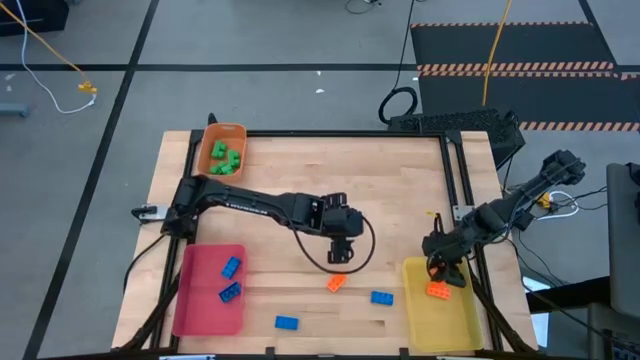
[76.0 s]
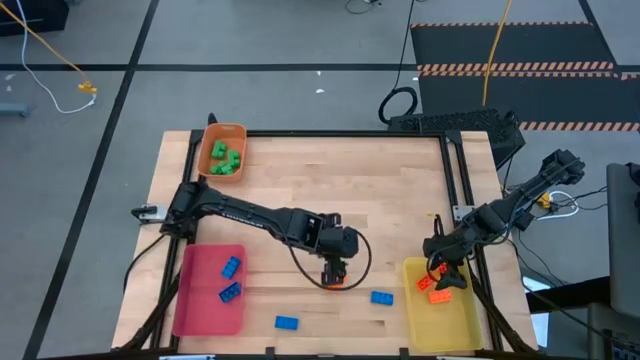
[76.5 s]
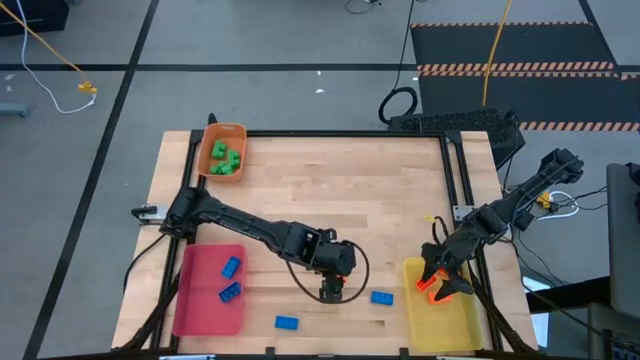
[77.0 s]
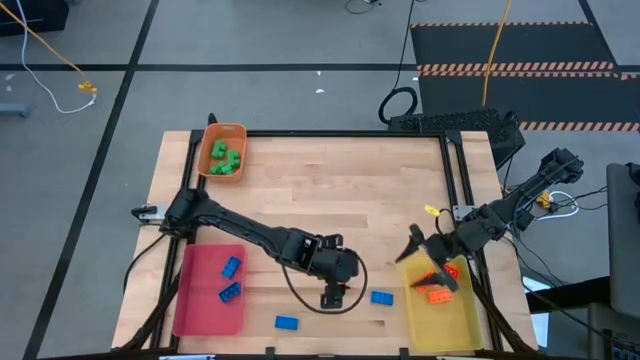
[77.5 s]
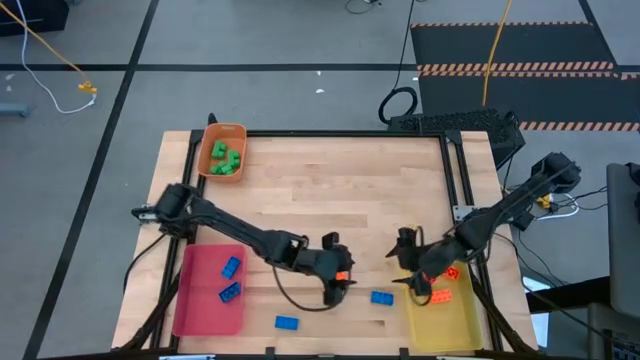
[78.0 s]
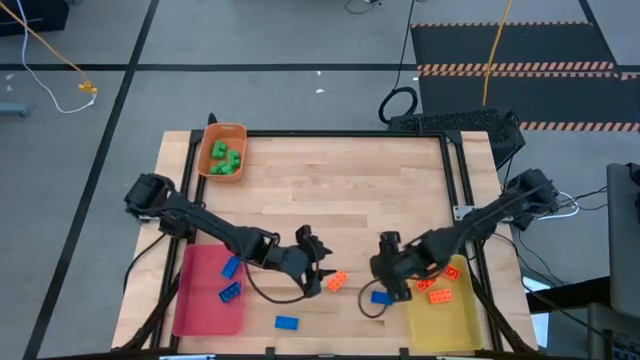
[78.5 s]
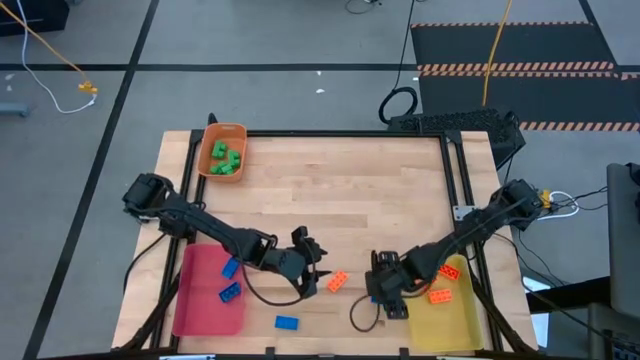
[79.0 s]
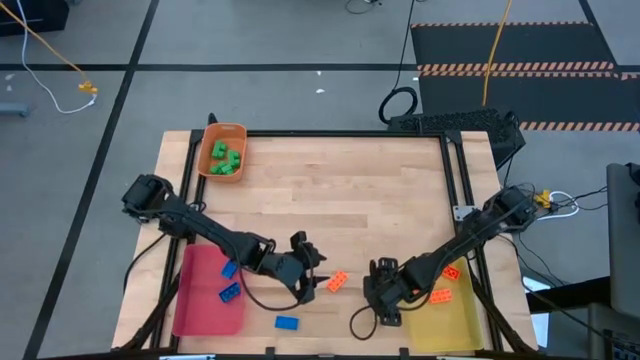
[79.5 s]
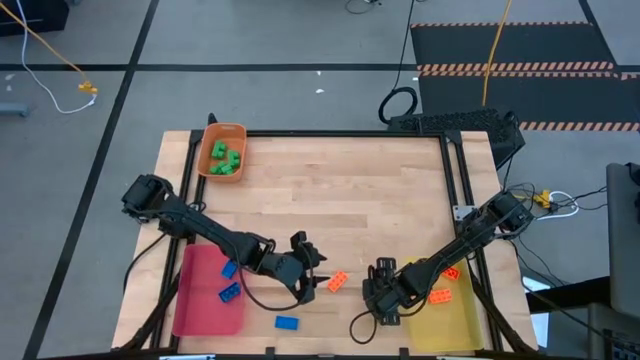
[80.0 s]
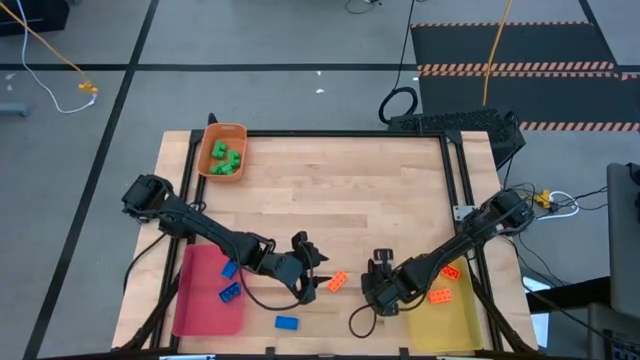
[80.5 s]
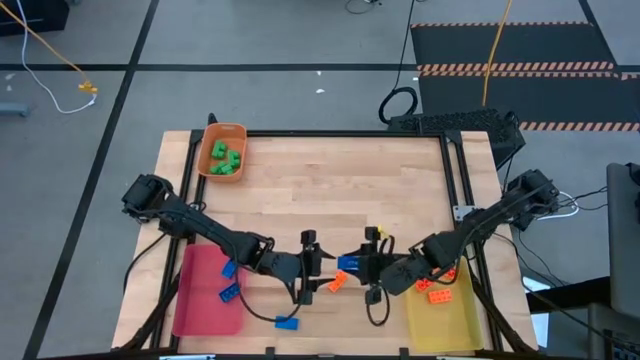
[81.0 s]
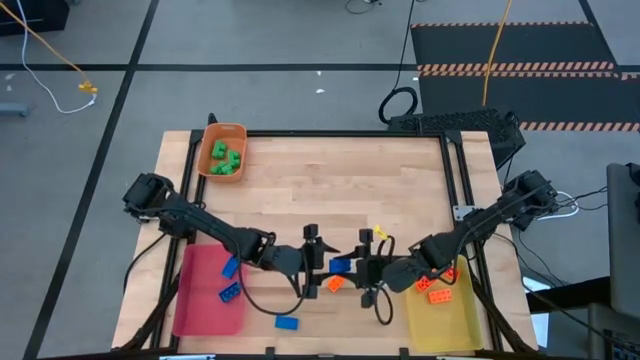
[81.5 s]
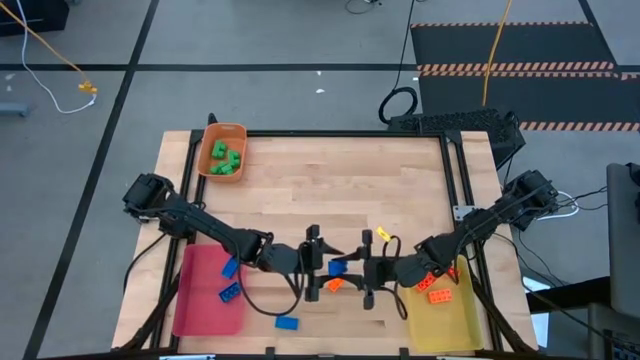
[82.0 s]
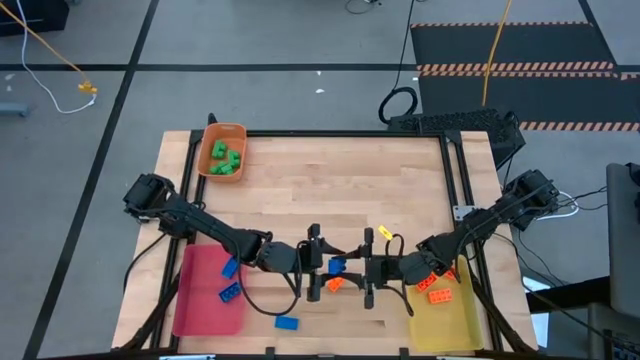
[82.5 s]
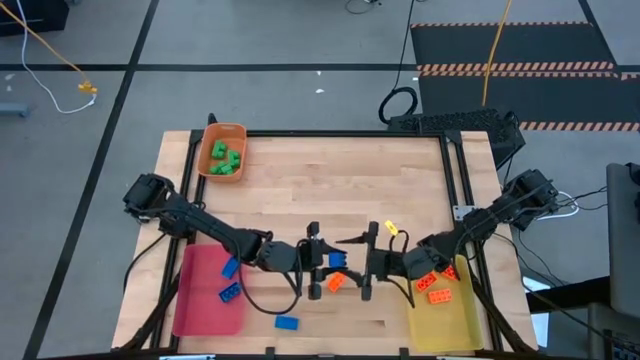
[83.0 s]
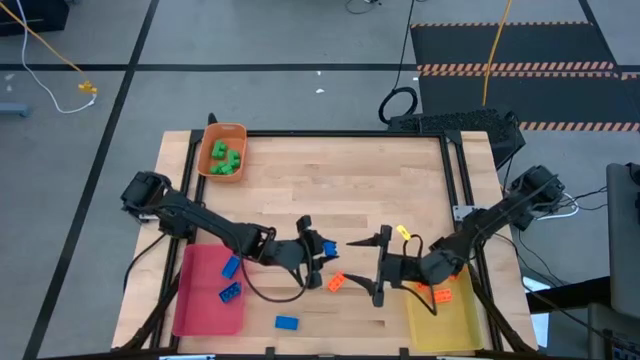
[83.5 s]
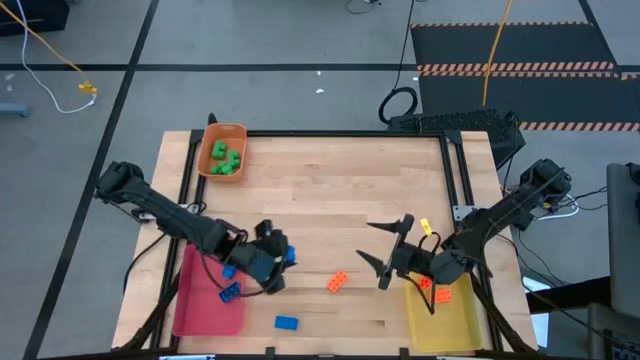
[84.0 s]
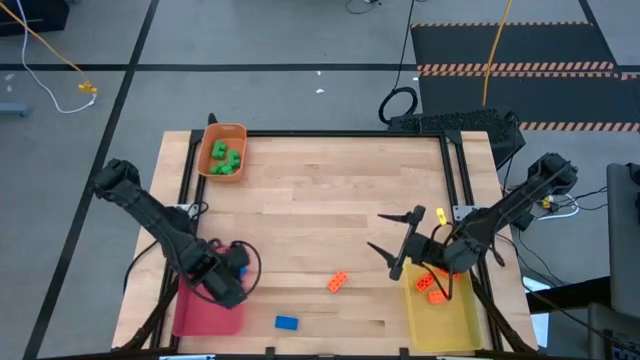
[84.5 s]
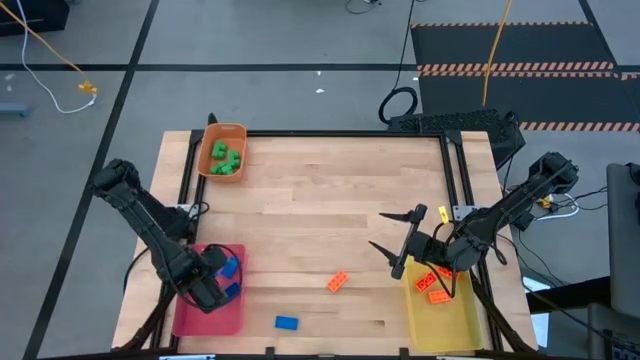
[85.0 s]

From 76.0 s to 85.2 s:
Task: Sort & place blocks by color
Put the blue game piece into the red bin

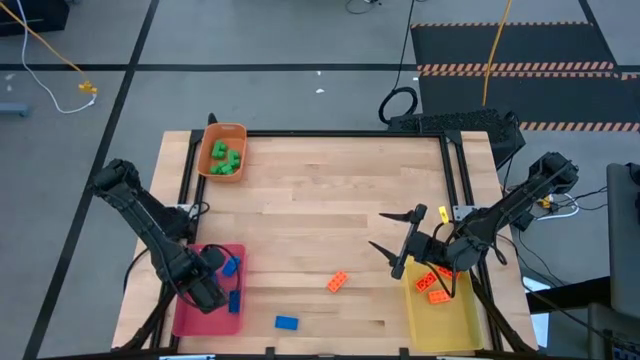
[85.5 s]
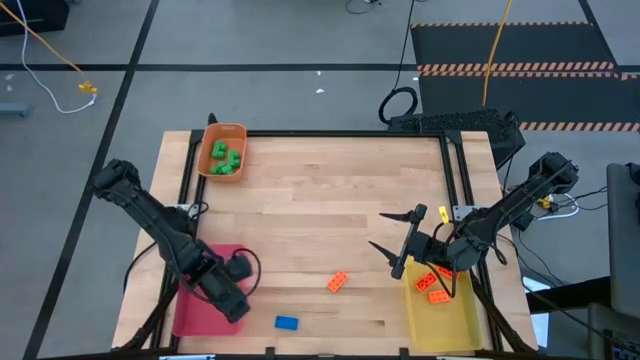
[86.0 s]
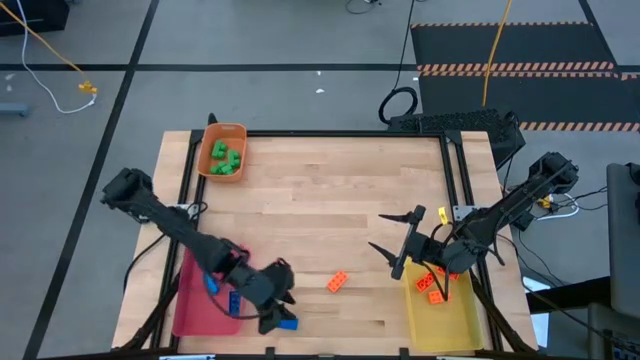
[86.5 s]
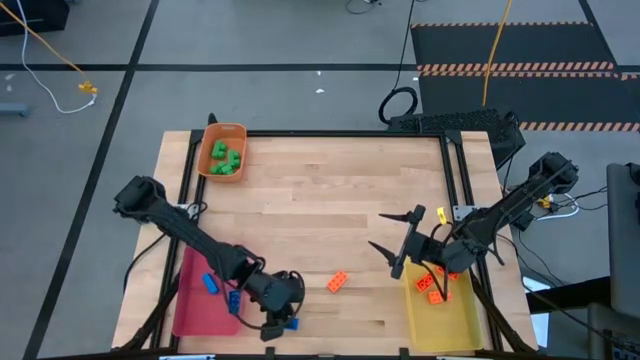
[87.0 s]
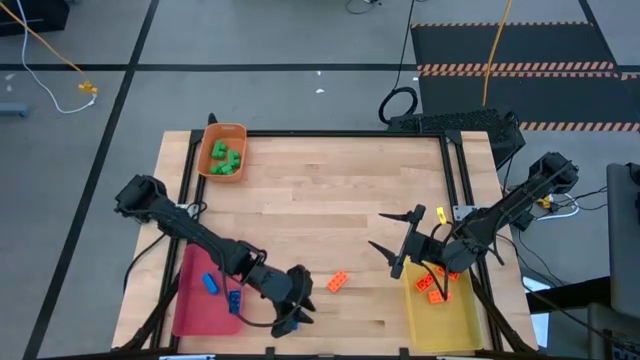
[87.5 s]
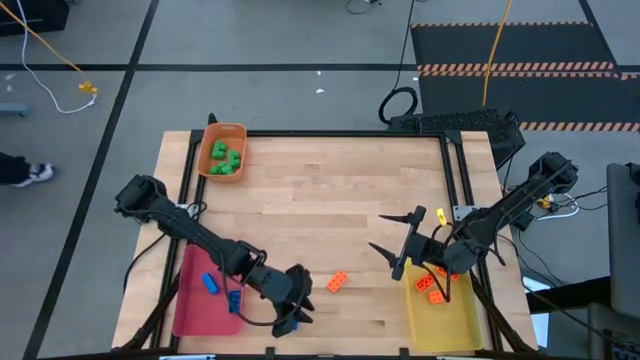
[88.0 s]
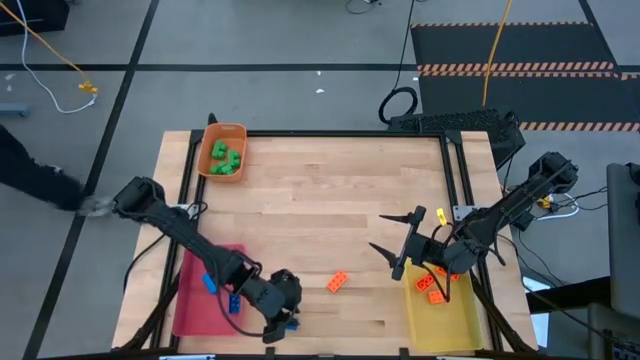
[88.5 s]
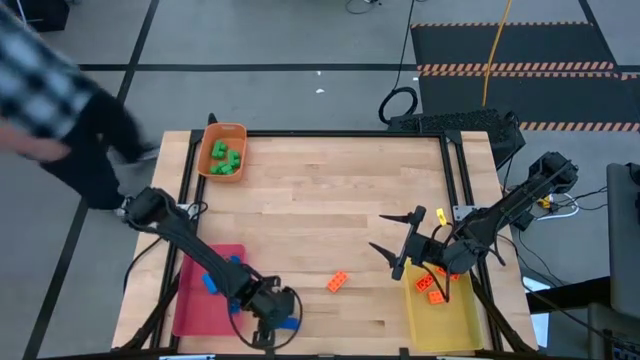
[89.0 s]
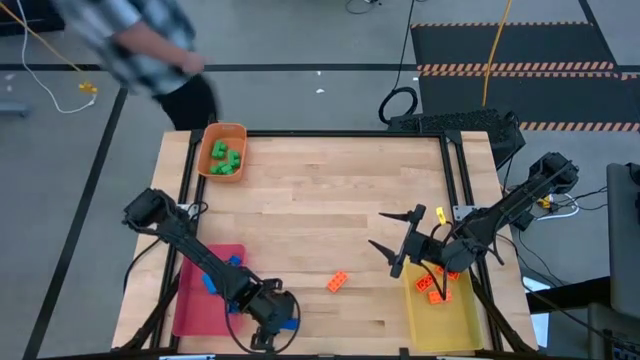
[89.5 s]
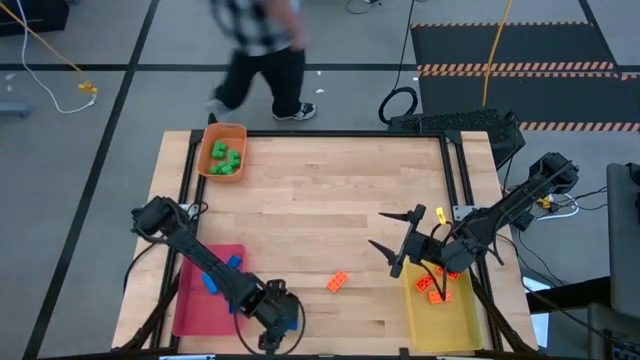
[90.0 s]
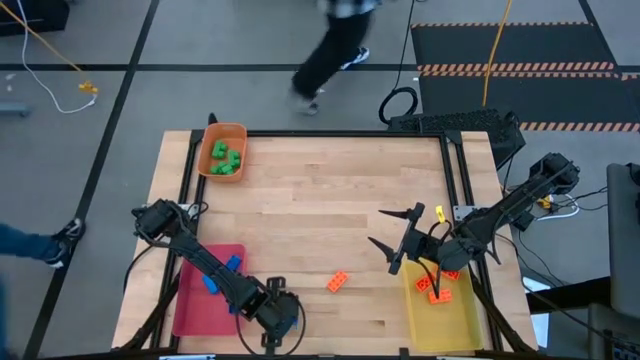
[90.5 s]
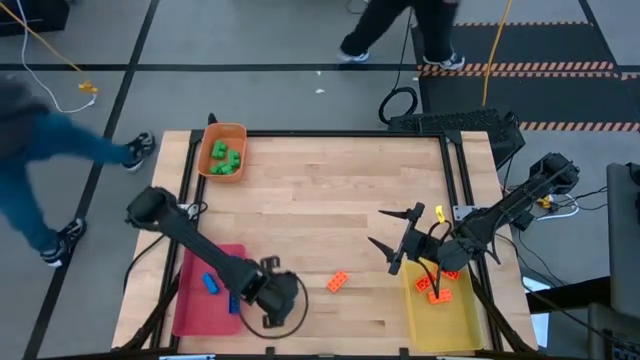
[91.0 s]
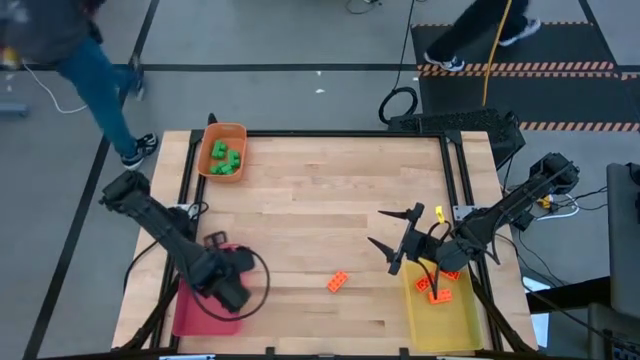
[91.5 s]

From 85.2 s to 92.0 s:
Put the blue game piece into the red bin

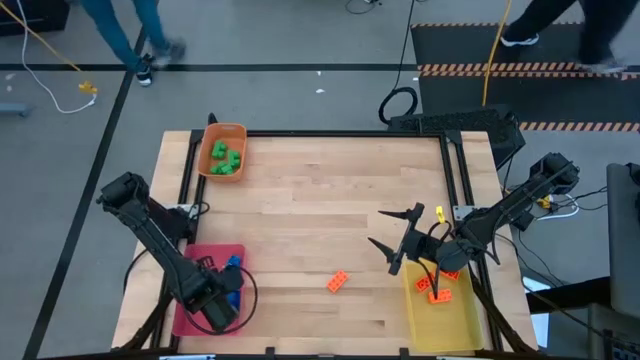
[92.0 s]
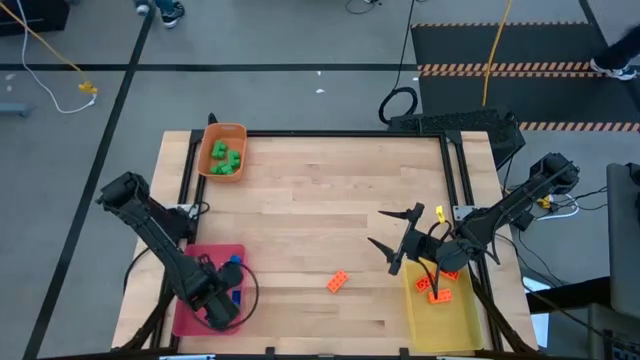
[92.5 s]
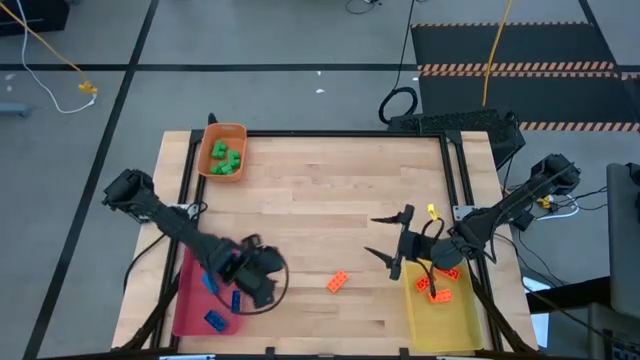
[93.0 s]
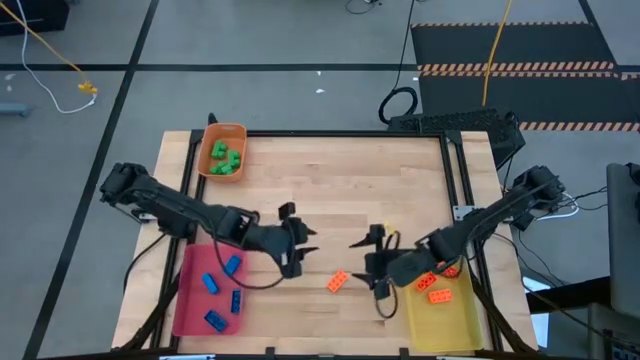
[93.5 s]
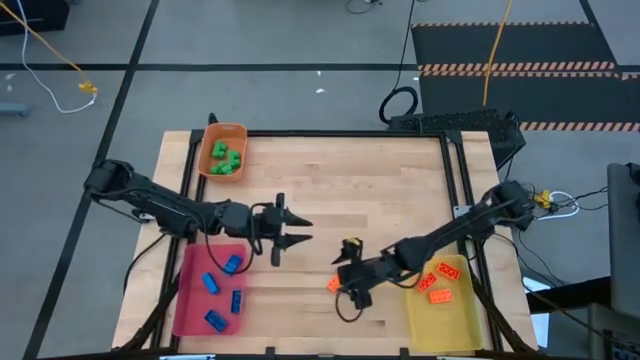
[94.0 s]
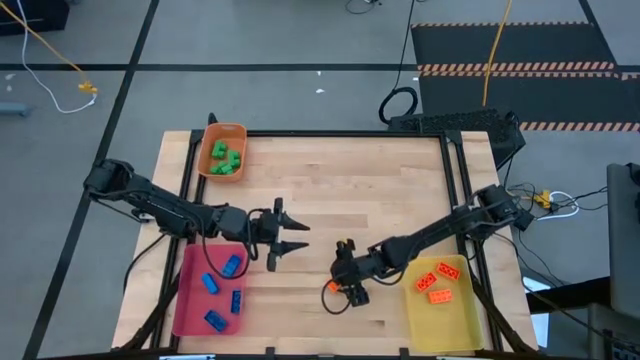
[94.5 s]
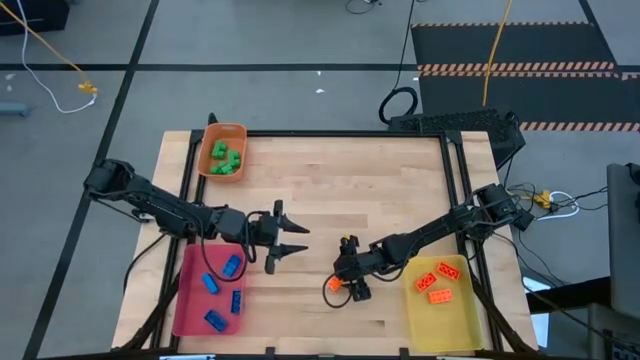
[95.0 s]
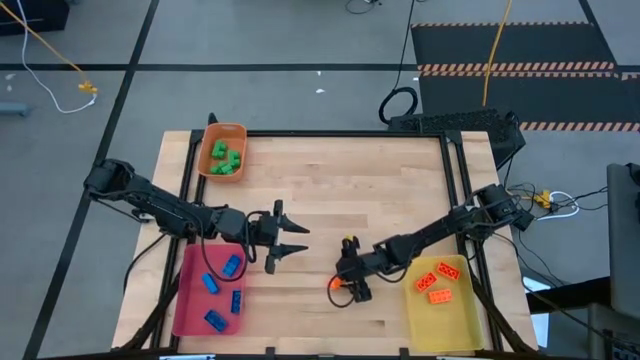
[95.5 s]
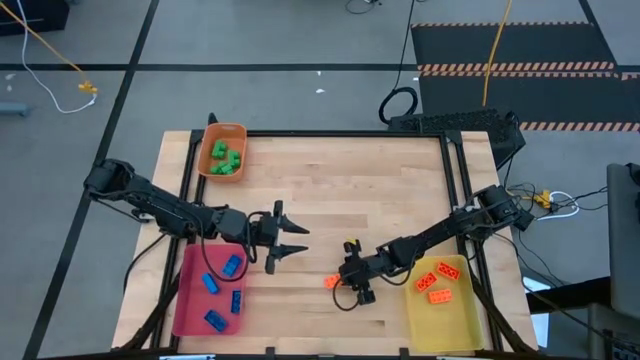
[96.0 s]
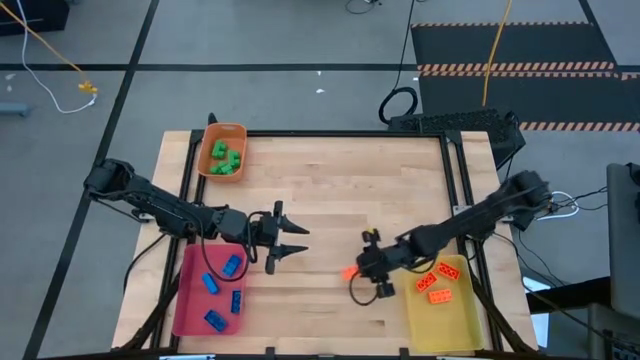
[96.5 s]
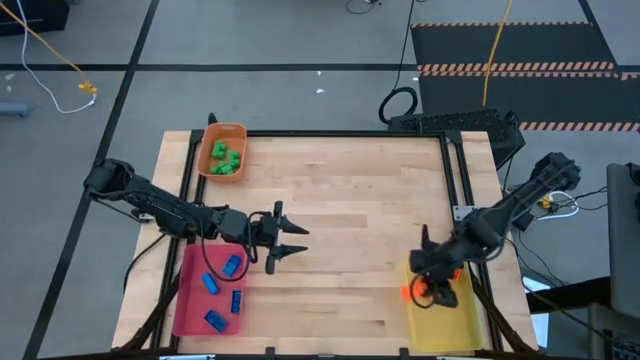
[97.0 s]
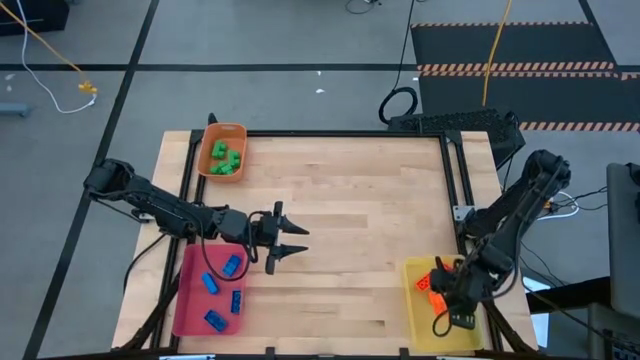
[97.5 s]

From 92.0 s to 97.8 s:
Put the orange game piece into the yellow bin

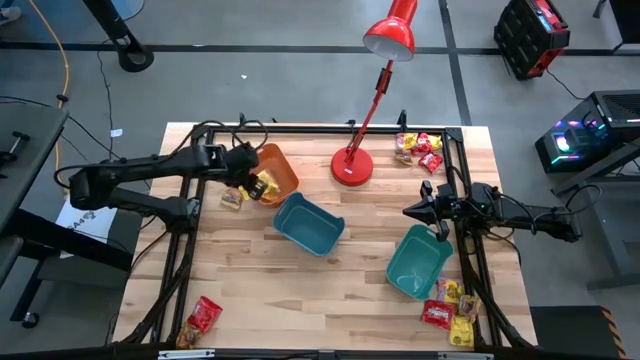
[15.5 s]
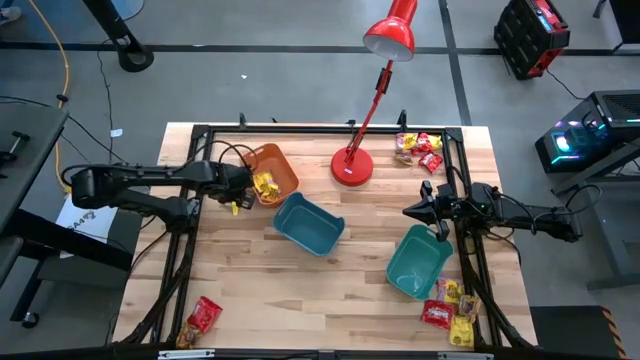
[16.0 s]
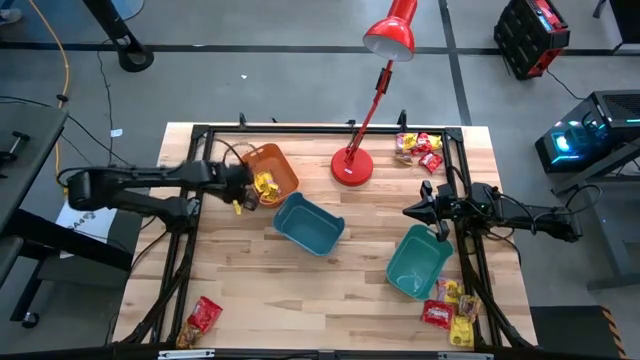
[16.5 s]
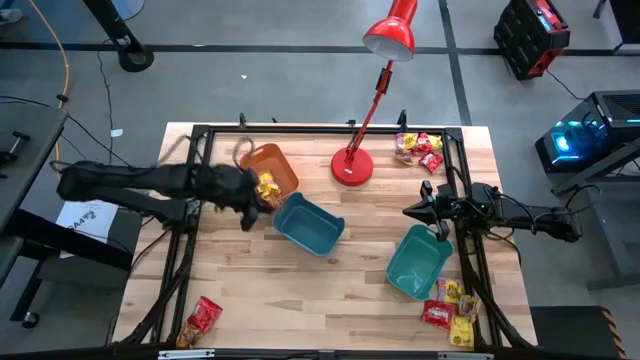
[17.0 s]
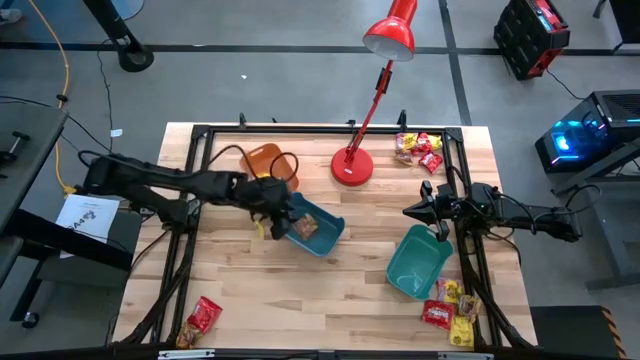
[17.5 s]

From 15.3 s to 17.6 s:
Task: Sort candy
Put the top left gold candy into the blue bin
